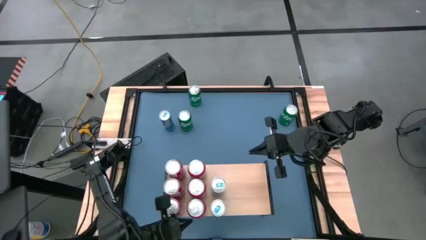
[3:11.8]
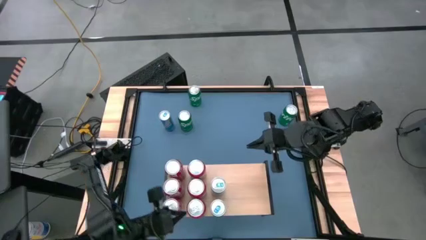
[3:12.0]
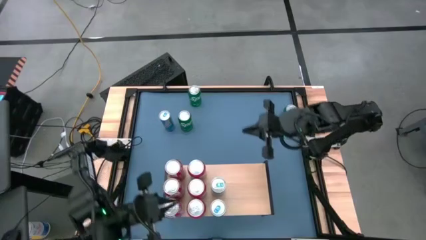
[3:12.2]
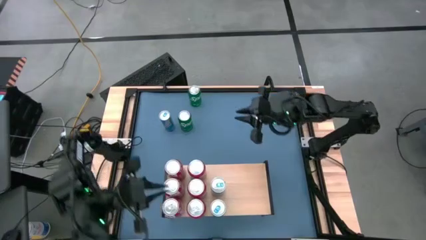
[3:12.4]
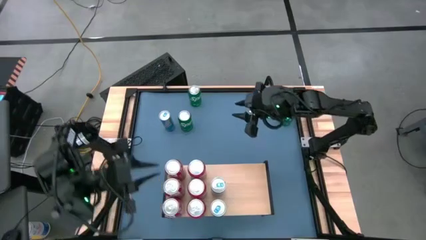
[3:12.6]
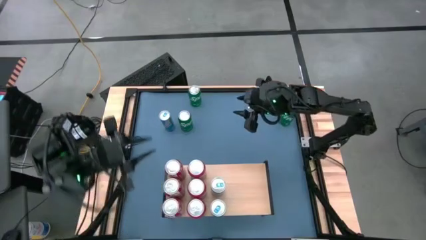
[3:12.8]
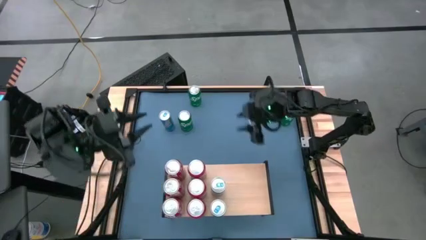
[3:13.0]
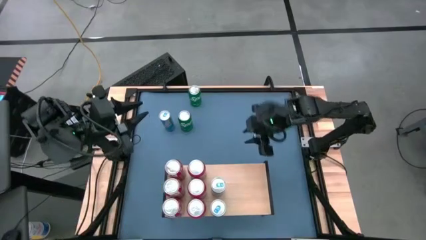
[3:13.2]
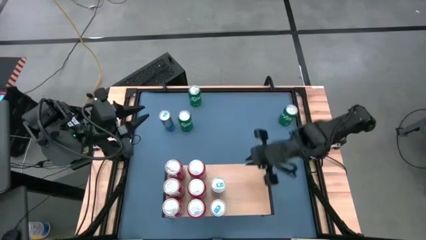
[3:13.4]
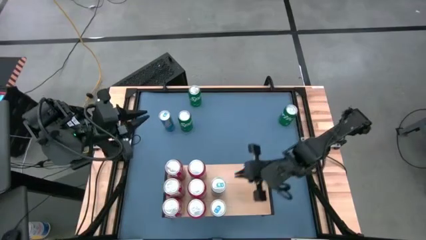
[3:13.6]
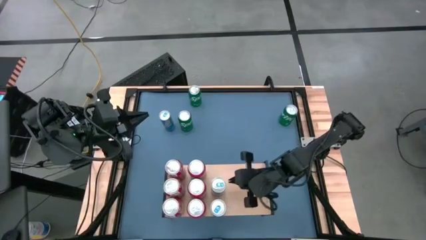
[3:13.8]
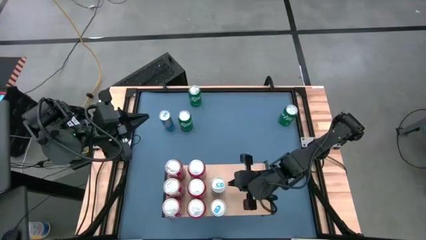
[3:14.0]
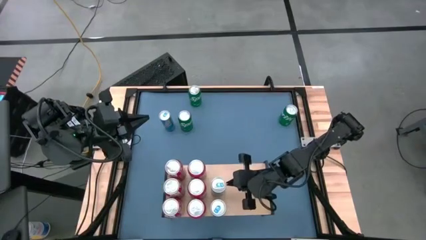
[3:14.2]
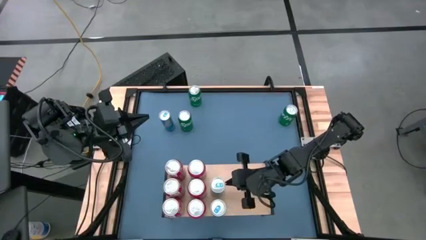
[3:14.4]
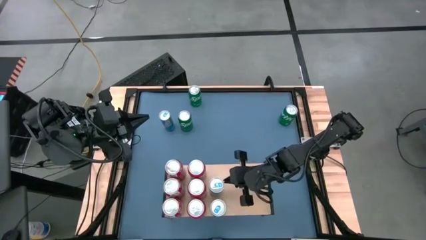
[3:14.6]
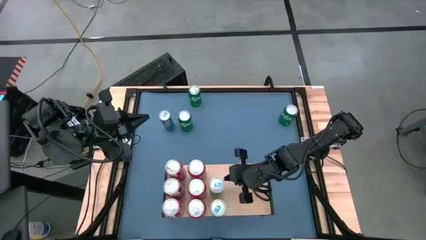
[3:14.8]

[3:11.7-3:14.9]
Task: Place canned beverage on shelf
Adjust the blue can on the shelf

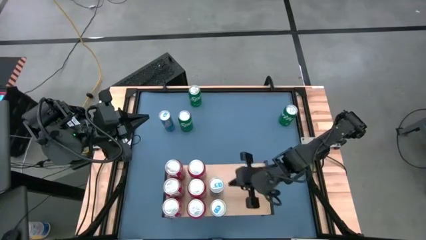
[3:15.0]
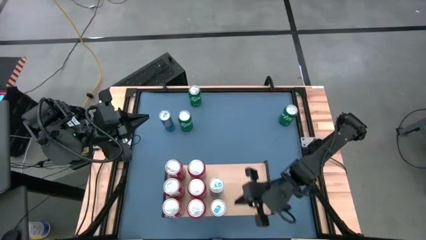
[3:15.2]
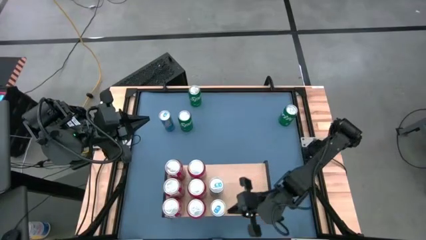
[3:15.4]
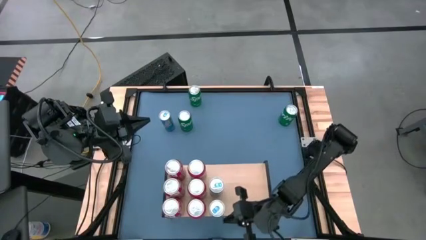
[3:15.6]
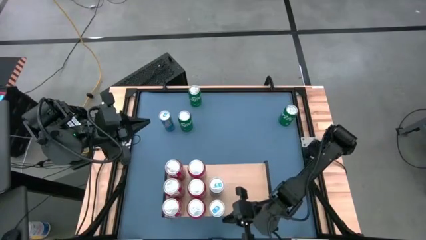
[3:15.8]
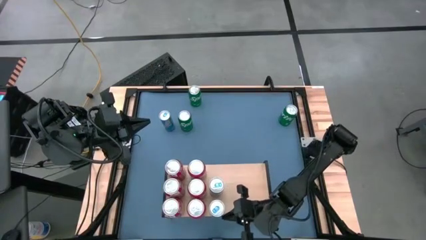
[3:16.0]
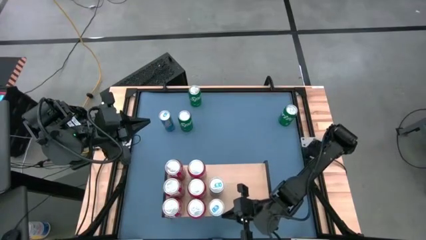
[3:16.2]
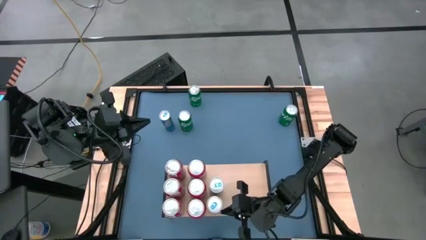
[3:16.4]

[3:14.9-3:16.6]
Adjust the blue can on the shelf

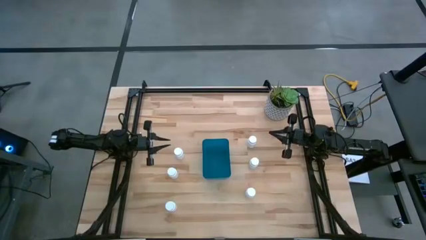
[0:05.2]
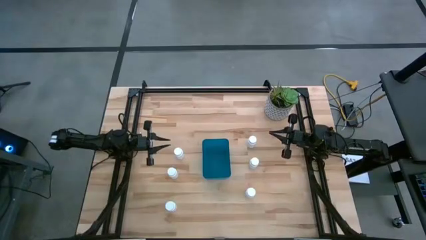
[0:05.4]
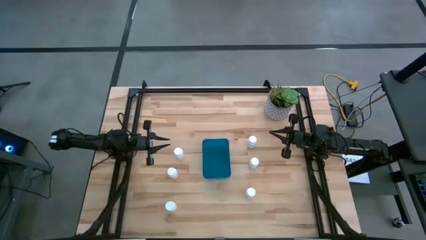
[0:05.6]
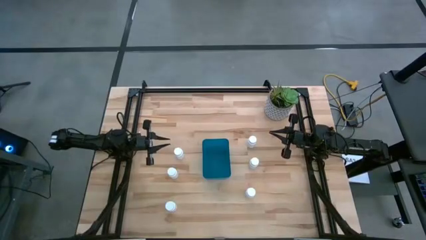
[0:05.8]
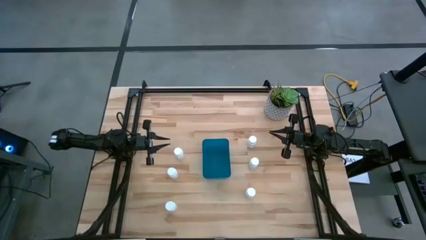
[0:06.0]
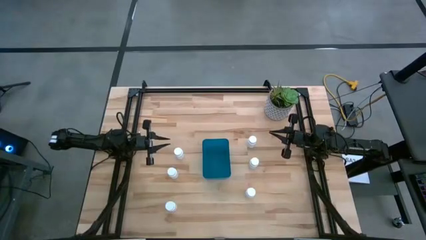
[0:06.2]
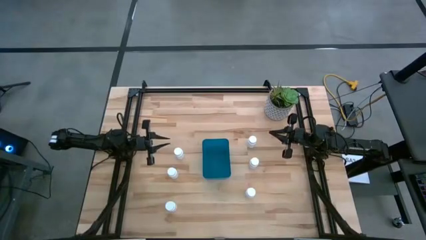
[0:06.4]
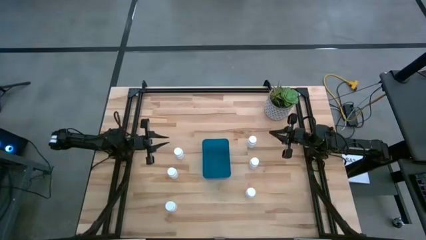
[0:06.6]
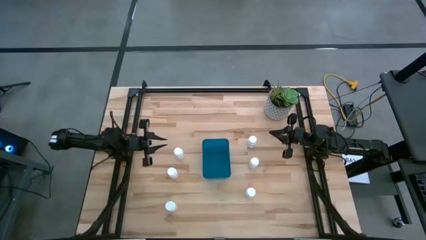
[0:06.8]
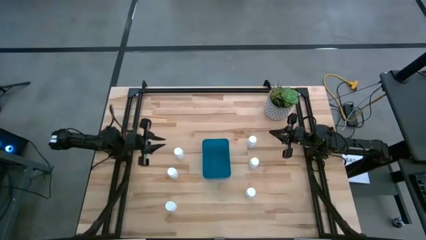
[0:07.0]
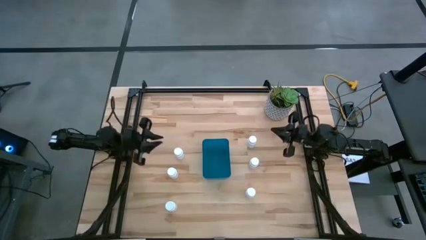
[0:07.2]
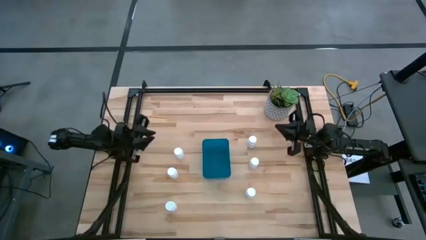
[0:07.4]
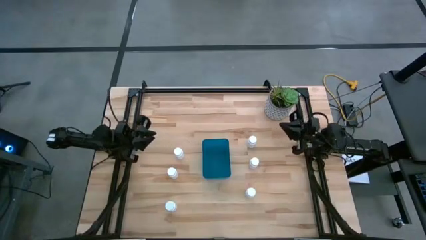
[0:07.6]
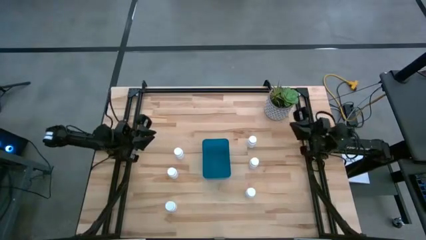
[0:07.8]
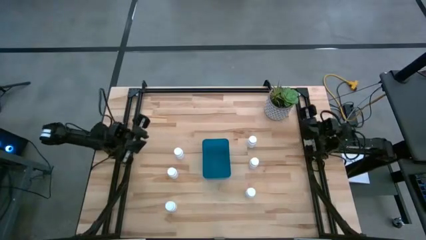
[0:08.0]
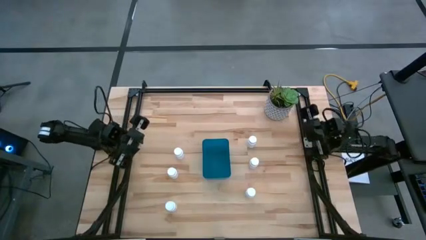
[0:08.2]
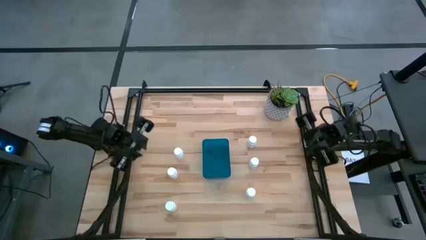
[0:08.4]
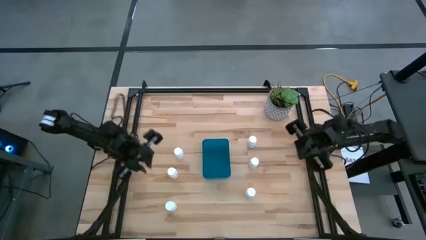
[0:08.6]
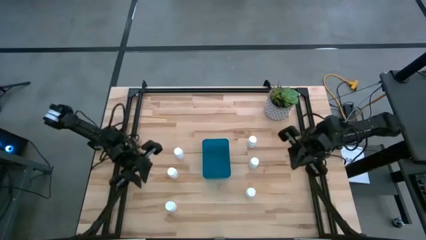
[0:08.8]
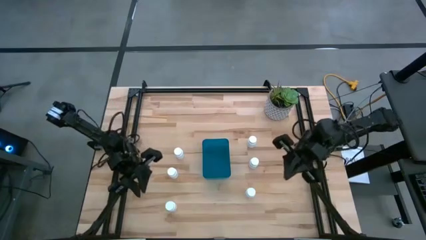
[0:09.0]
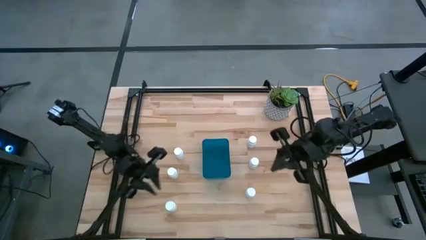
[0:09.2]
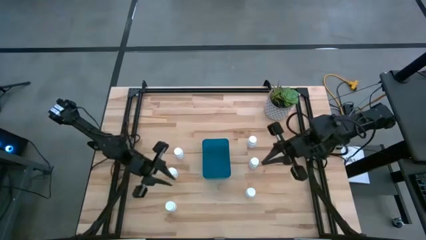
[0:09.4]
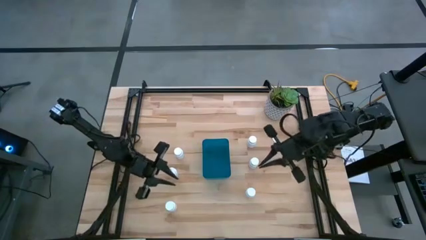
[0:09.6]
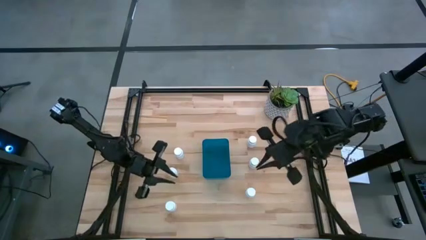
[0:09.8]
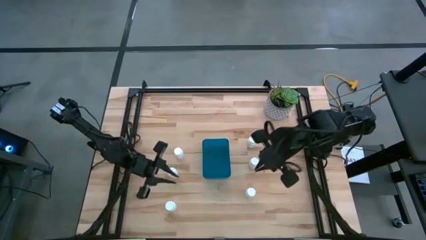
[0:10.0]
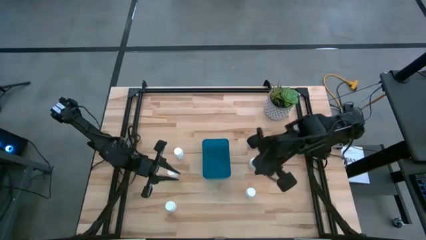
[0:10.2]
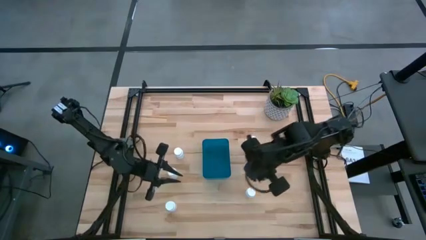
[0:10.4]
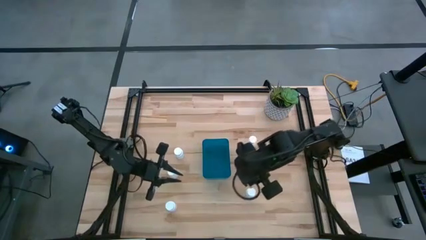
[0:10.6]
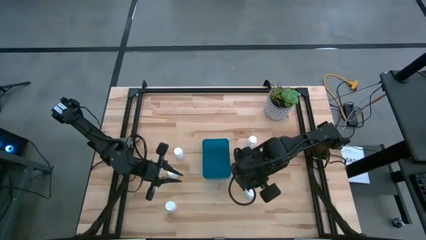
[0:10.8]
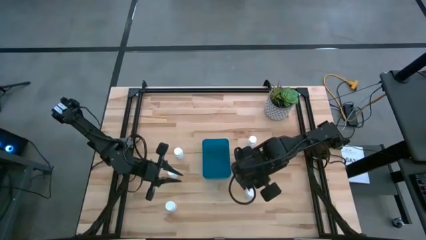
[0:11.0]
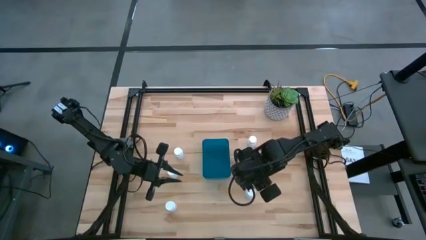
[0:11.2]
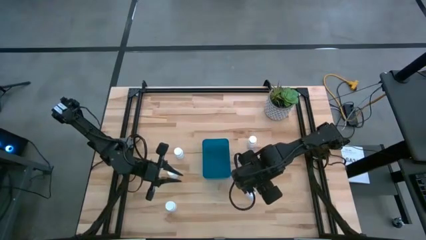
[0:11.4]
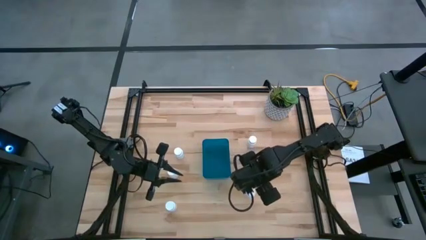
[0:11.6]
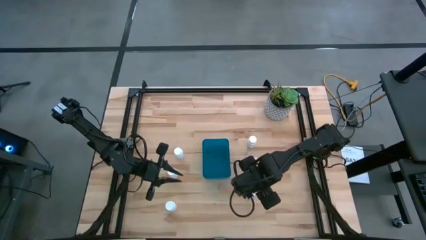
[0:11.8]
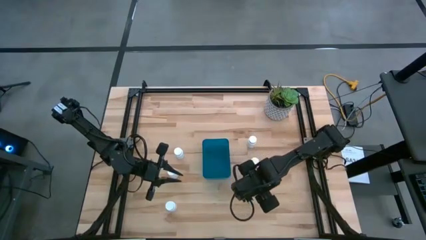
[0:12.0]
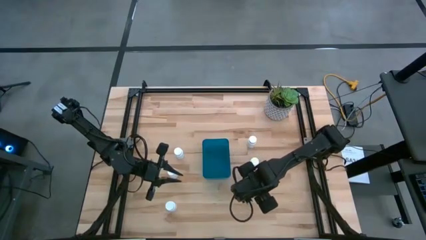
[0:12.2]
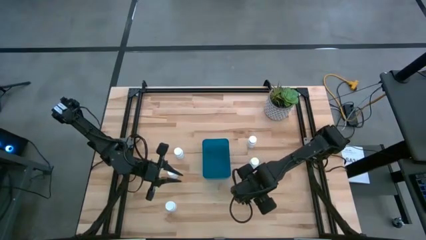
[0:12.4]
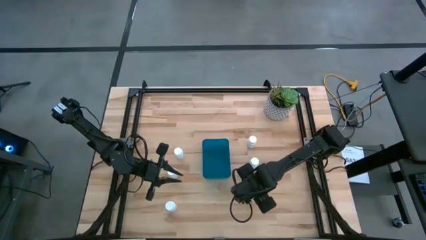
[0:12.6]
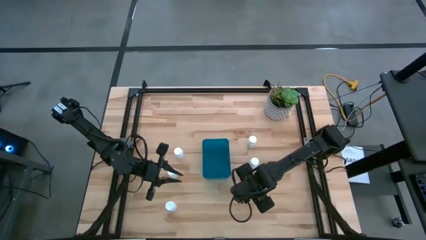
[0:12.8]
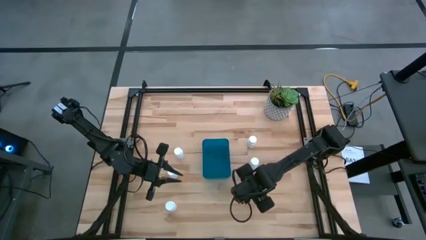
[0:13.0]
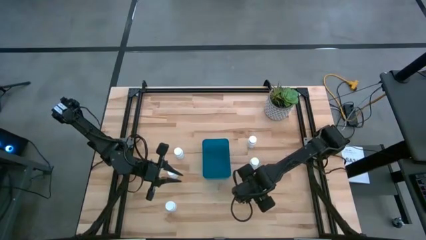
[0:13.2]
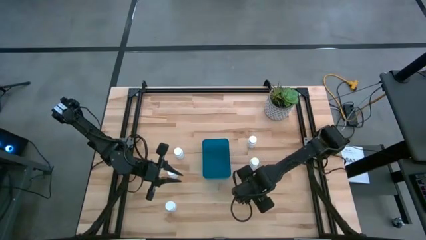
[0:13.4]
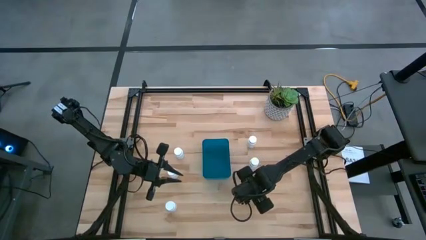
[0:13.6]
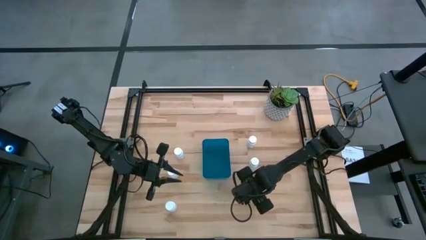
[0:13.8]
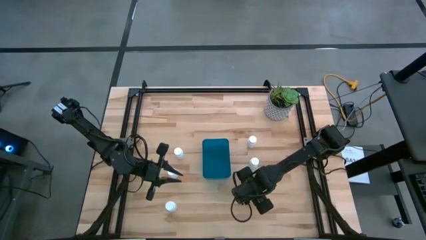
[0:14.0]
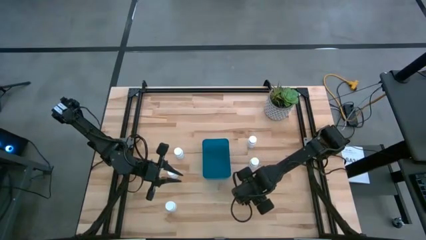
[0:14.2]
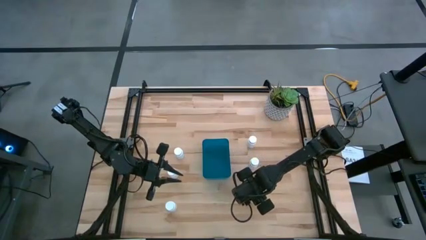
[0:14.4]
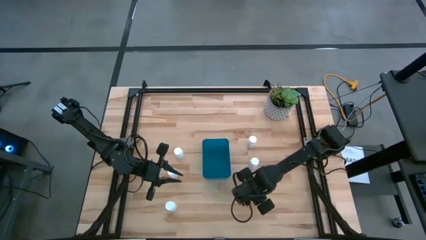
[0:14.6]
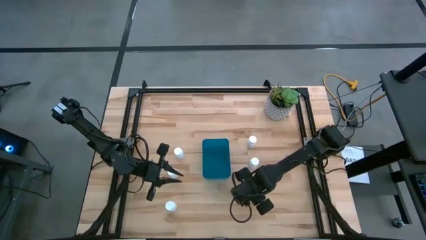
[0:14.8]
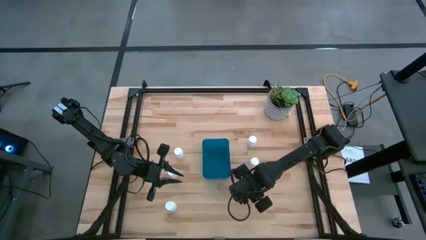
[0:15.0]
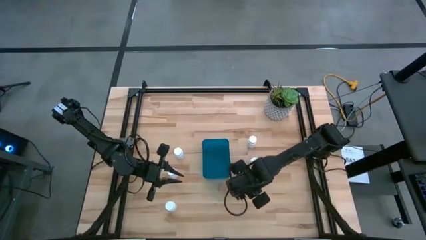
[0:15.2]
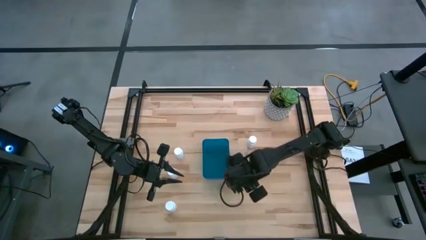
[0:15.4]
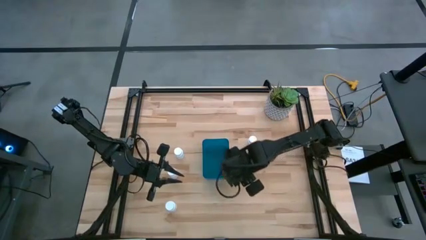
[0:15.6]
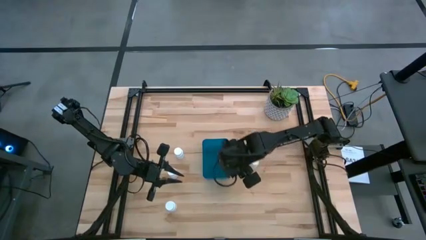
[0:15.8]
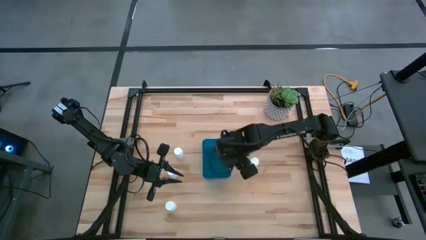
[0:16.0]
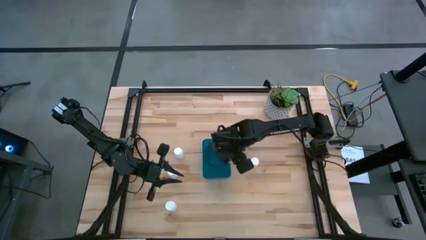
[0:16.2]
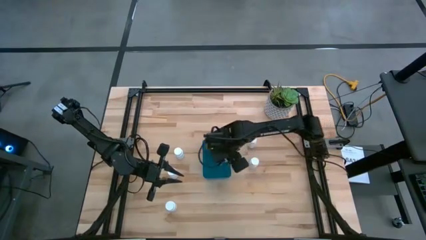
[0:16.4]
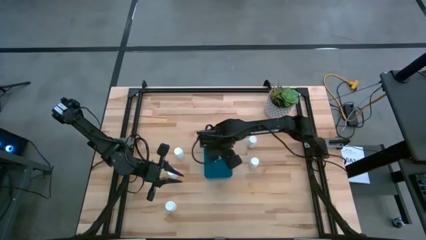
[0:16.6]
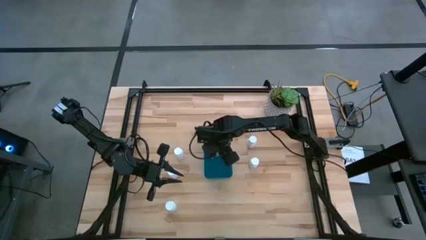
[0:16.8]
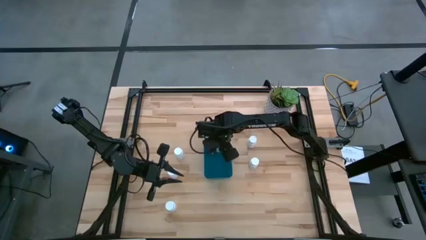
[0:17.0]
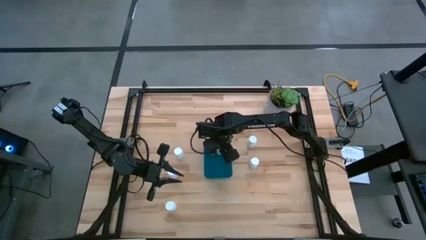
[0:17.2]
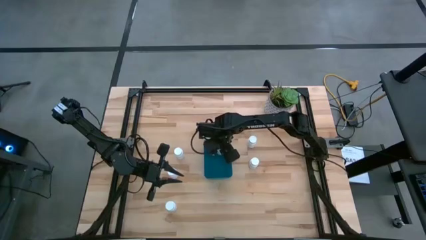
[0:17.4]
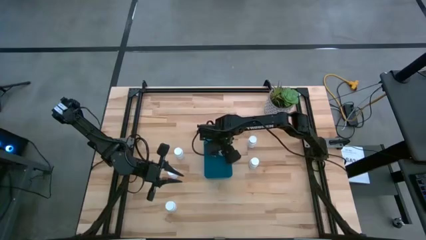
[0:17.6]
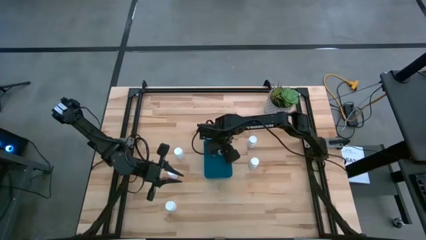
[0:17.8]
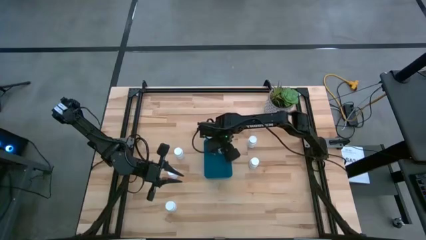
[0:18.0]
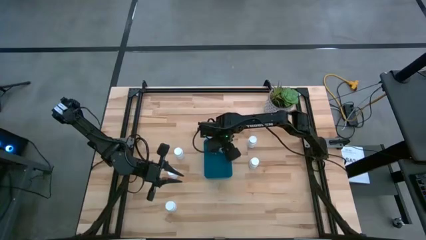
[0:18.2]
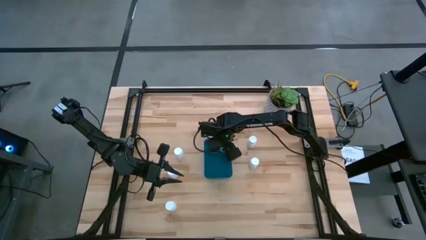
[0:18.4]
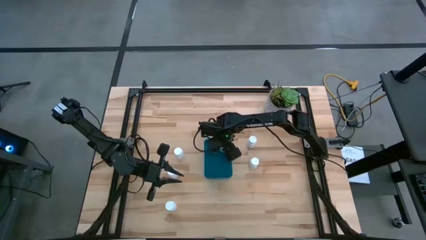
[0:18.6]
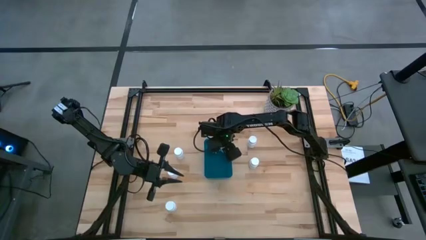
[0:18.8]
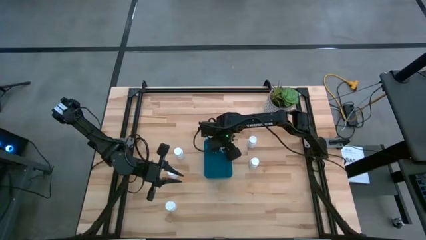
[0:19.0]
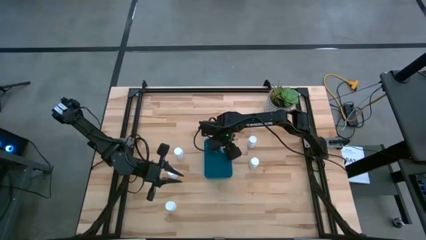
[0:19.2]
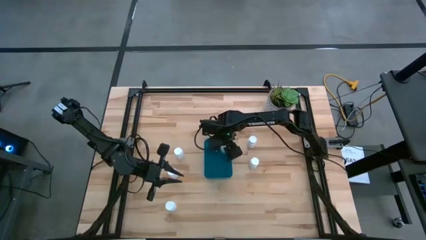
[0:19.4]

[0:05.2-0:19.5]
Task: Pick and place pill bottles into a basket
Put the medicine bottle in the blue bin
